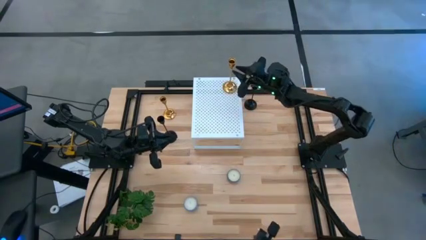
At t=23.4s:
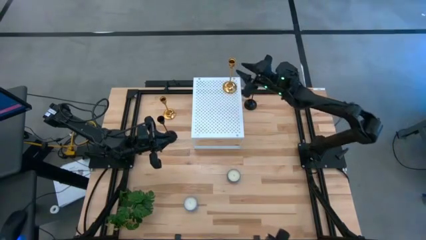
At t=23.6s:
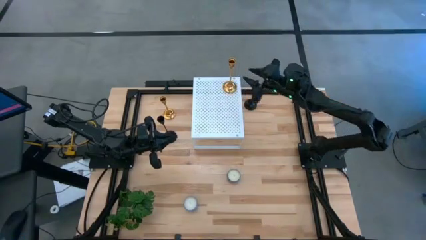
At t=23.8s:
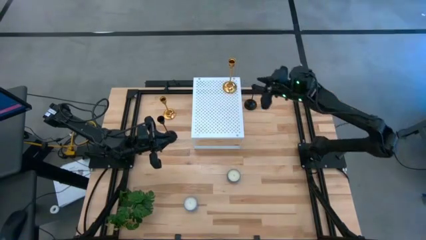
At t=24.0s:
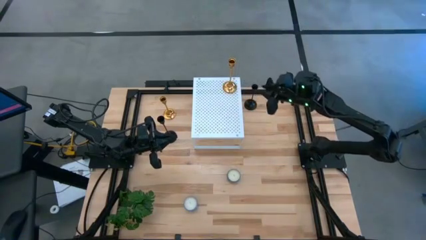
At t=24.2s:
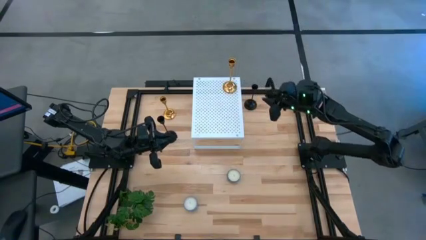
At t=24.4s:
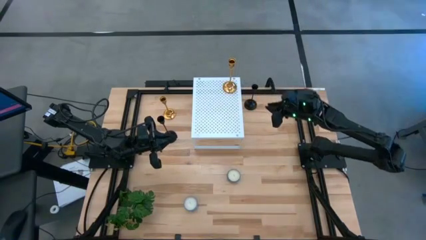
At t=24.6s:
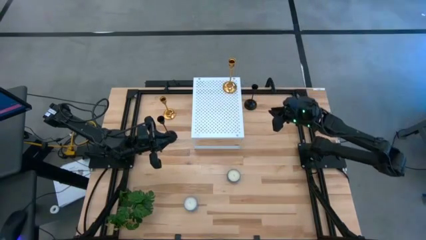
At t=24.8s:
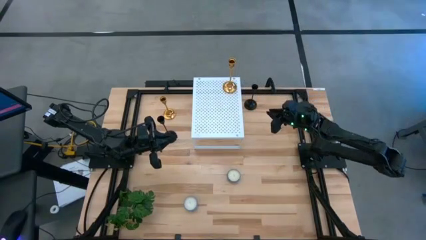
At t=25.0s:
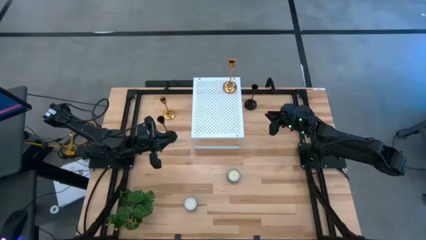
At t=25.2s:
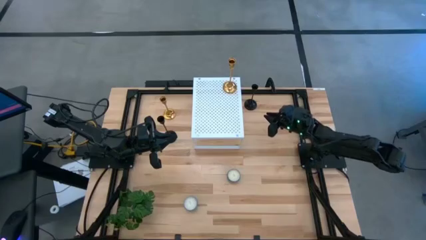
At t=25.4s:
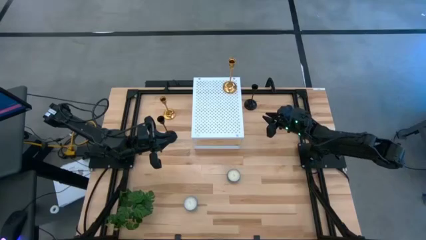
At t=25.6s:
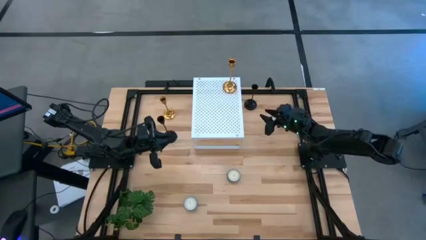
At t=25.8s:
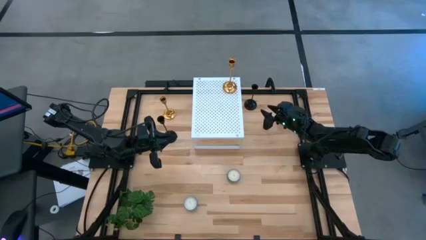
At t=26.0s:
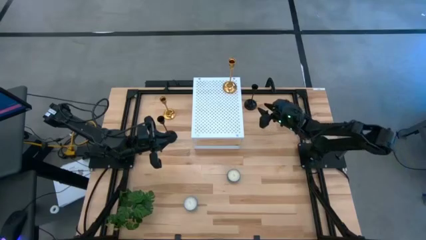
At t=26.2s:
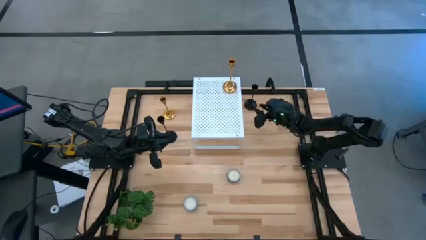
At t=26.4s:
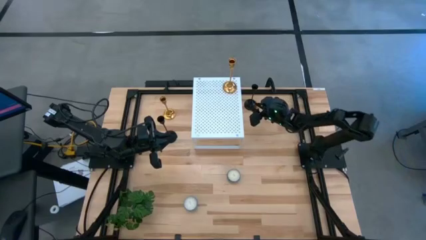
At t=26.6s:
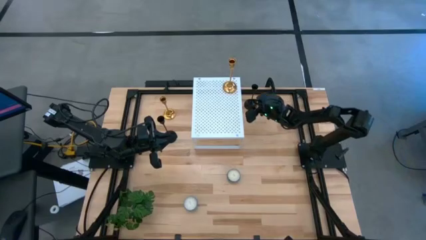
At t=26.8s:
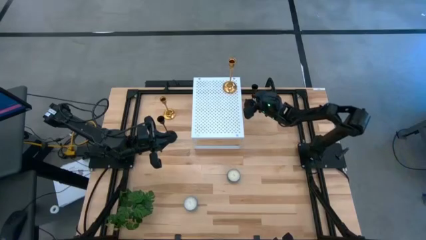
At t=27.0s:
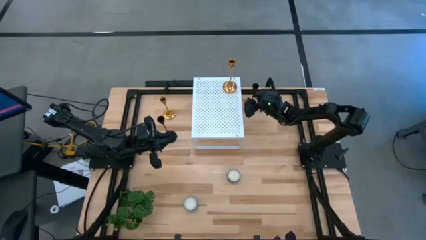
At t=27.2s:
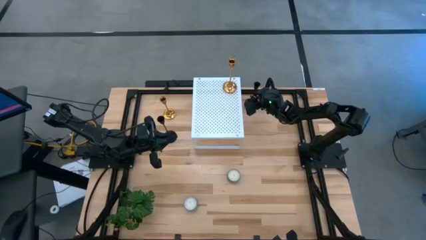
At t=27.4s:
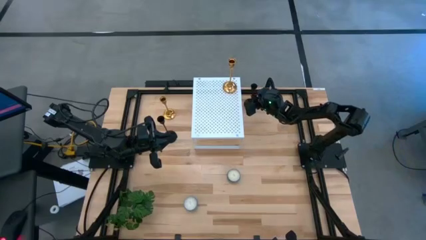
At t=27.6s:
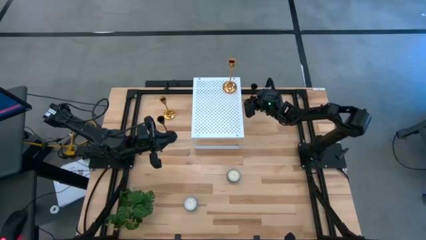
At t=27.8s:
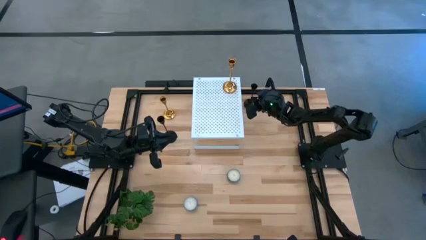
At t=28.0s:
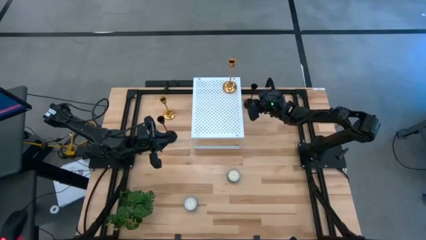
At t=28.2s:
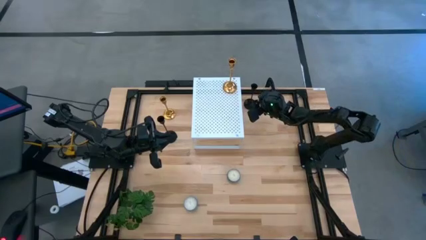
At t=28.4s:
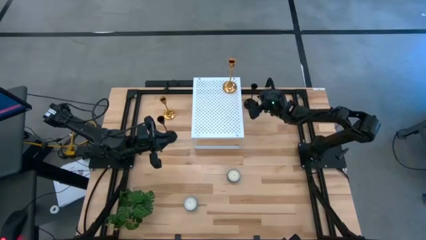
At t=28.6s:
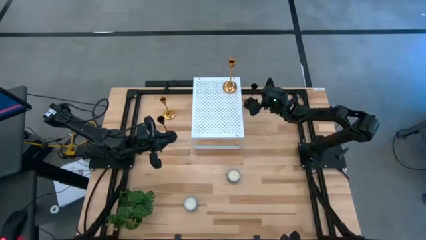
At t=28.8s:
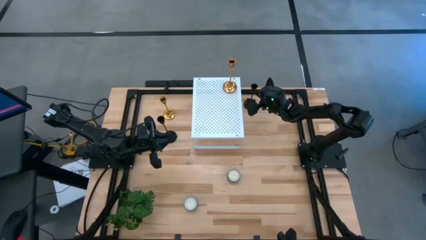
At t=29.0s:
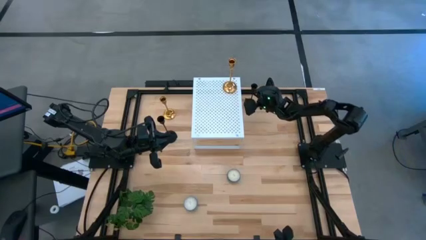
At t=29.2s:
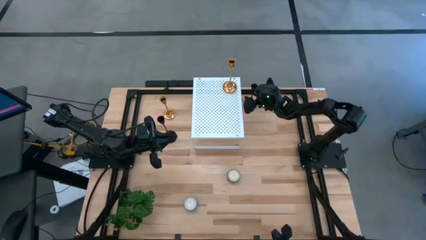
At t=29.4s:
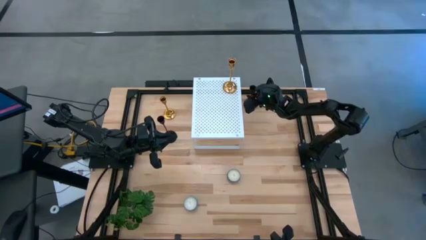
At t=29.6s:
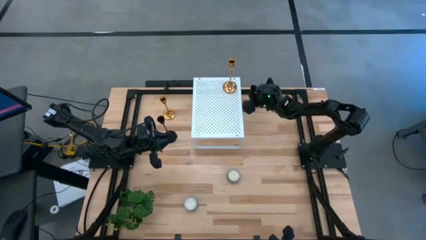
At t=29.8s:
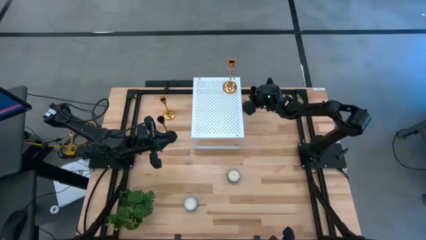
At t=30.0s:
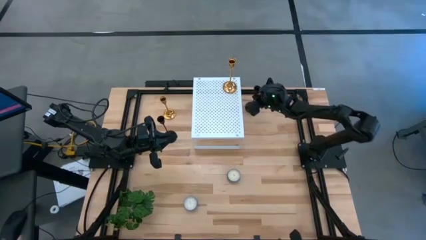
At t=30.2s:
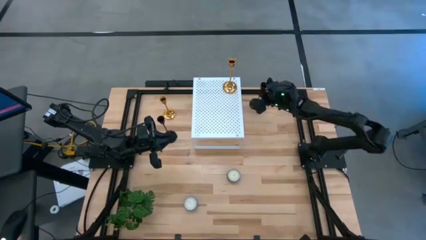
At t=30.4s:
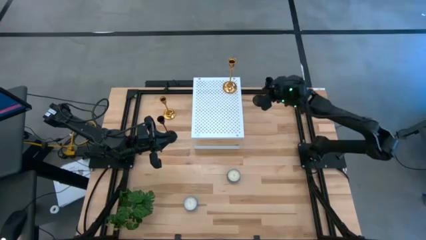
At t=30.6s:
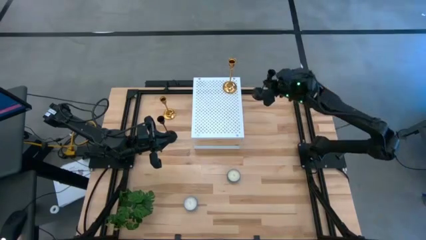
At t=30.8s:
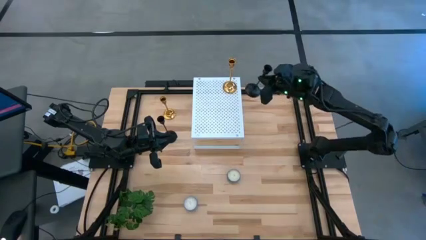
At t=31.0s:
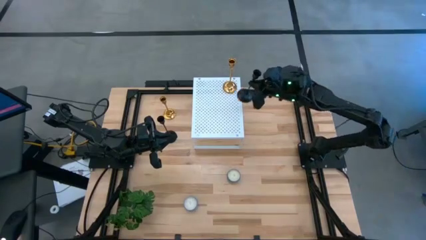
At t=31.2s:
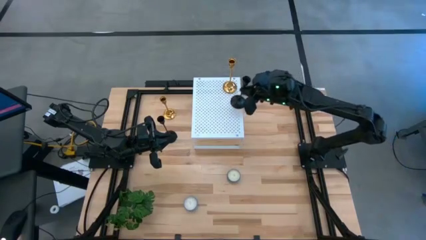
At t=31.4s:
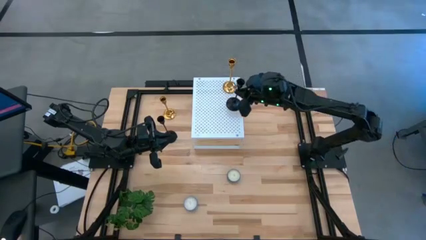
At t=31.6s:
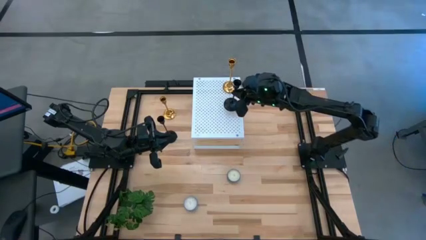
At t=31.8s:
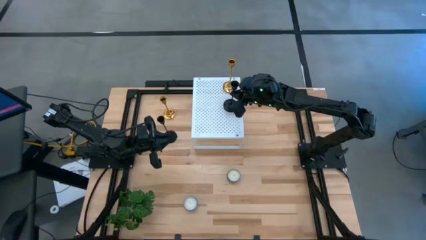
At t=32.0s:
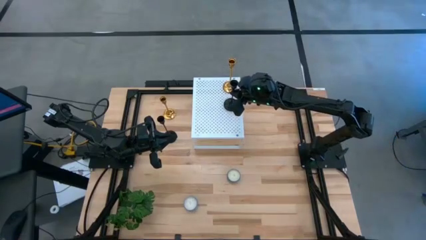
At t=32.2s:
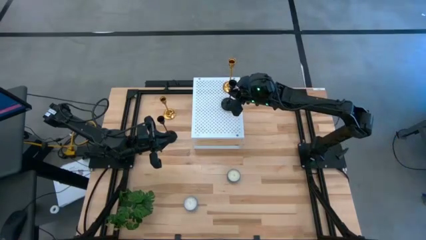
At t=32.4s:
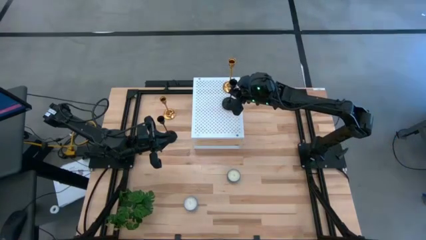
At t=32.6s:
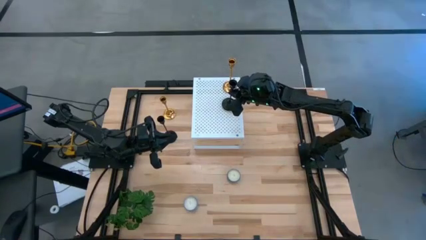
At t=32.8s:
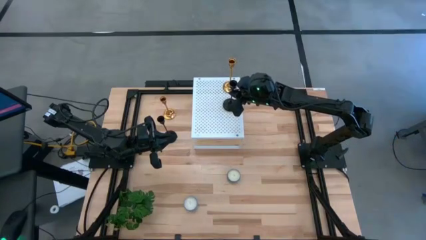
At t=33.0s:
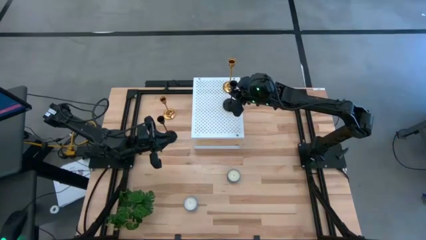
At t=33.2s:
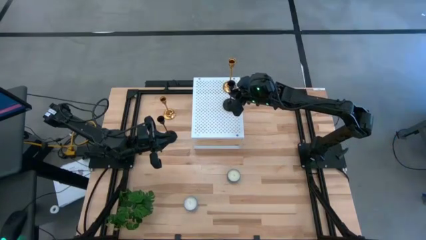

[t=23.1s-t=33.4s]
Task: Pick & Place candle stick holders
Put the small black candle holder on the shelf

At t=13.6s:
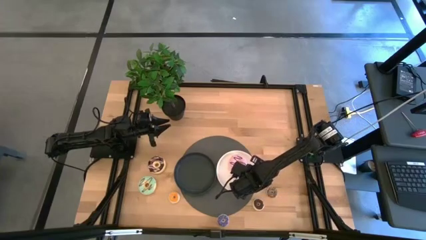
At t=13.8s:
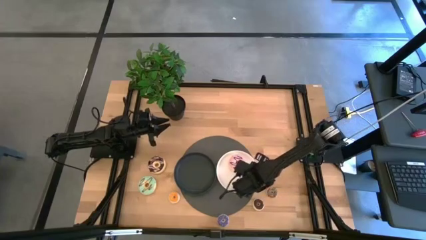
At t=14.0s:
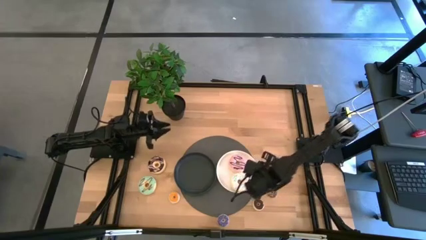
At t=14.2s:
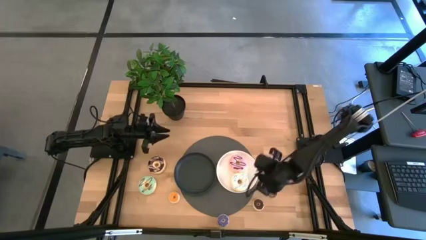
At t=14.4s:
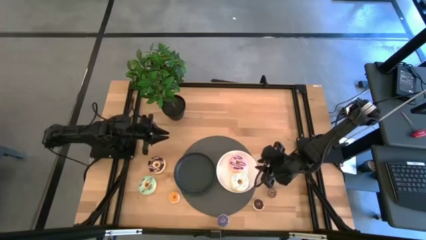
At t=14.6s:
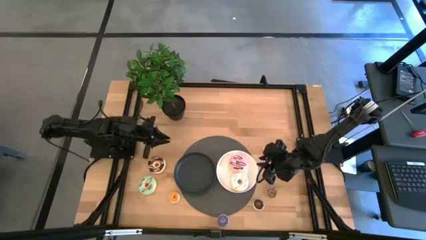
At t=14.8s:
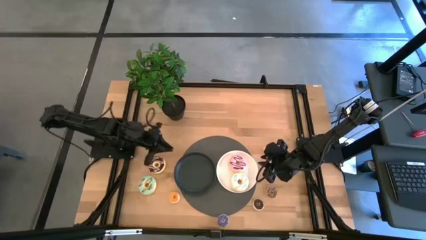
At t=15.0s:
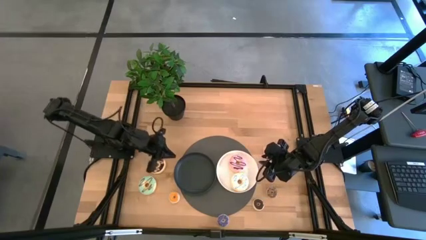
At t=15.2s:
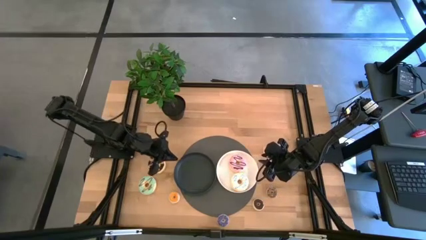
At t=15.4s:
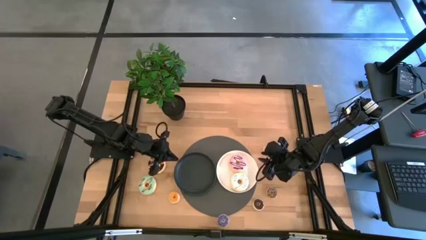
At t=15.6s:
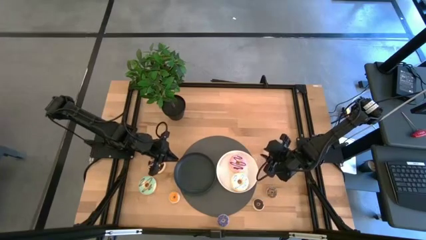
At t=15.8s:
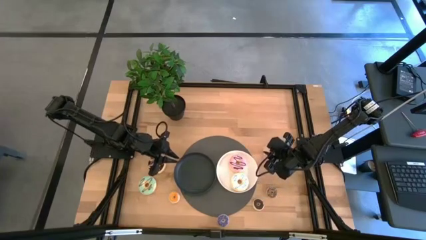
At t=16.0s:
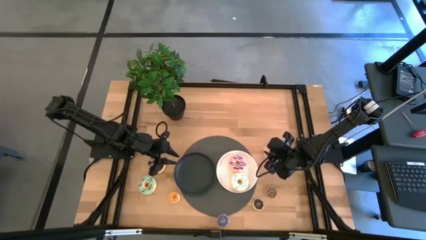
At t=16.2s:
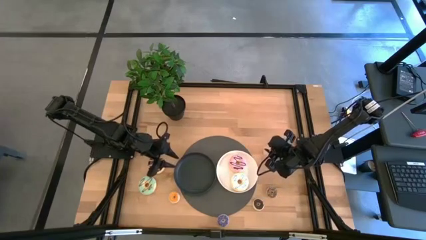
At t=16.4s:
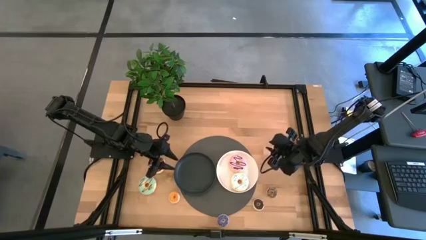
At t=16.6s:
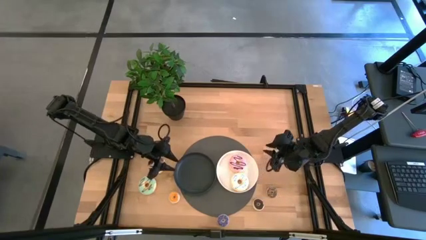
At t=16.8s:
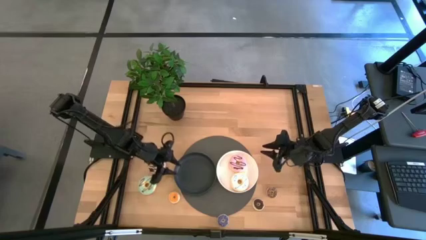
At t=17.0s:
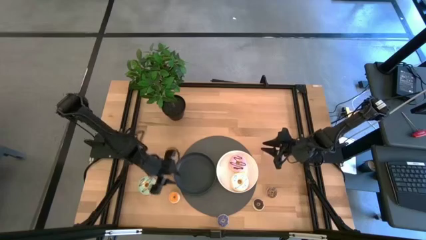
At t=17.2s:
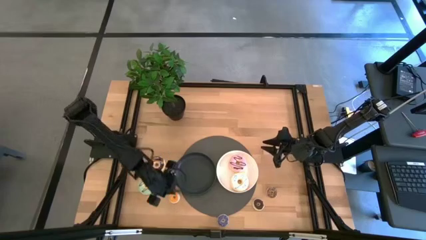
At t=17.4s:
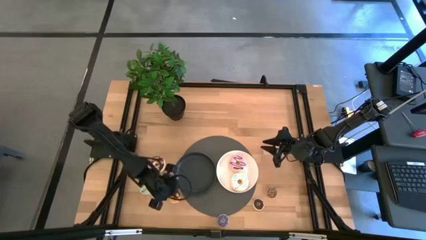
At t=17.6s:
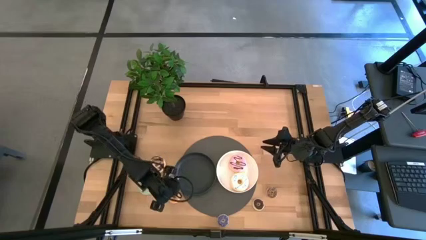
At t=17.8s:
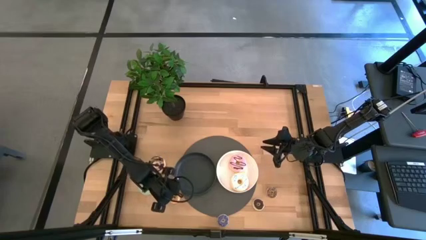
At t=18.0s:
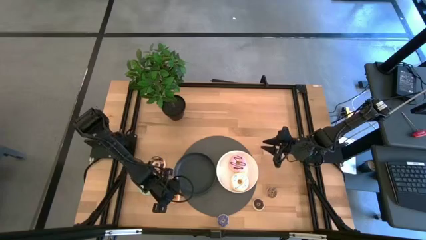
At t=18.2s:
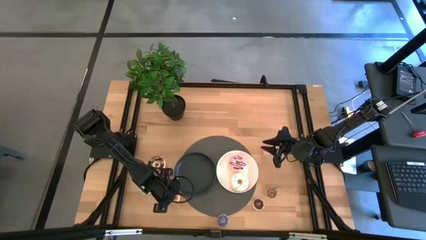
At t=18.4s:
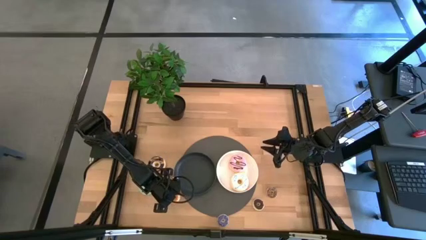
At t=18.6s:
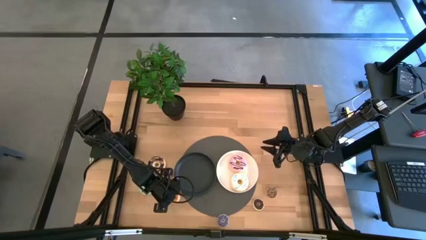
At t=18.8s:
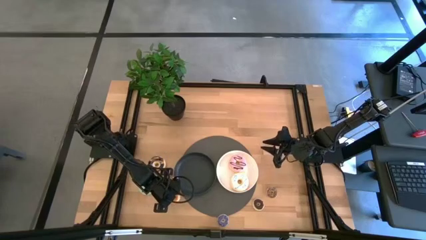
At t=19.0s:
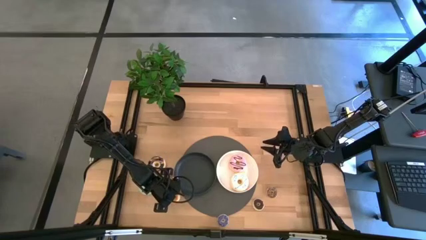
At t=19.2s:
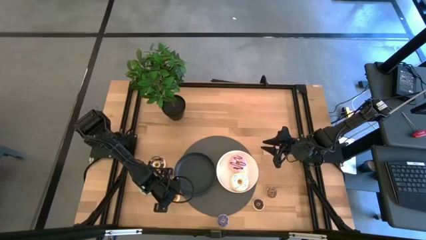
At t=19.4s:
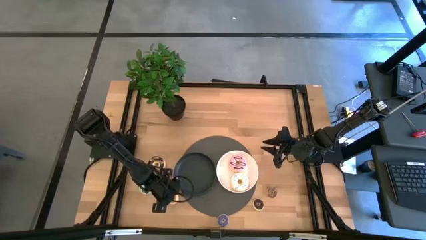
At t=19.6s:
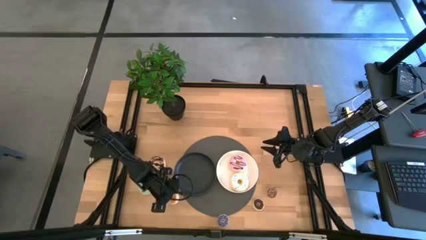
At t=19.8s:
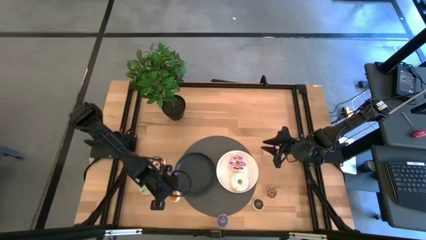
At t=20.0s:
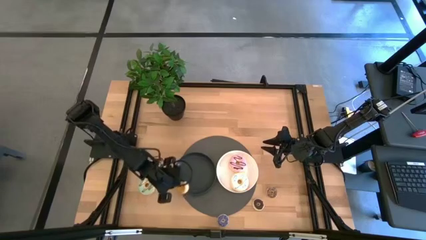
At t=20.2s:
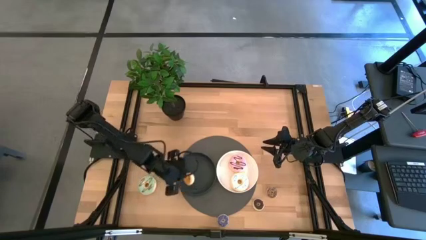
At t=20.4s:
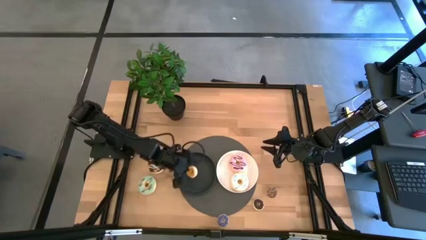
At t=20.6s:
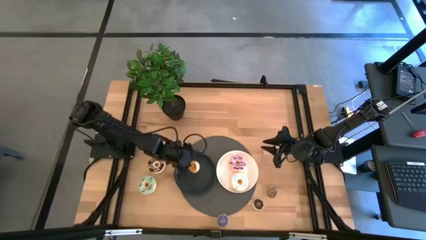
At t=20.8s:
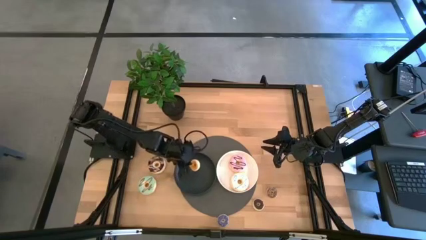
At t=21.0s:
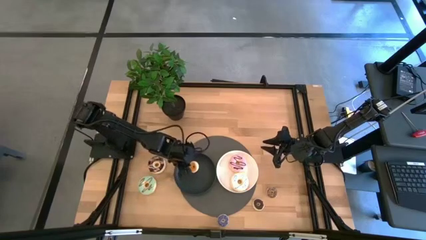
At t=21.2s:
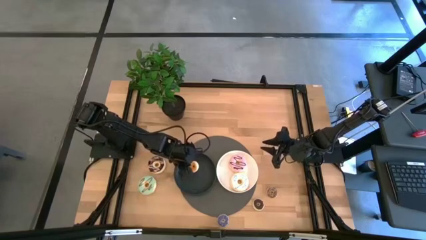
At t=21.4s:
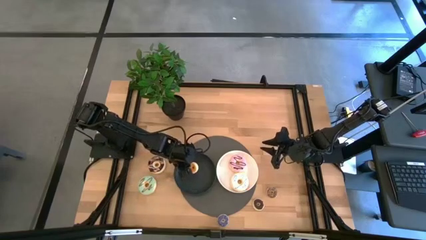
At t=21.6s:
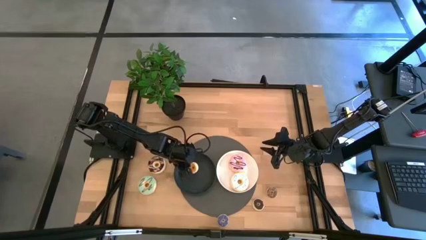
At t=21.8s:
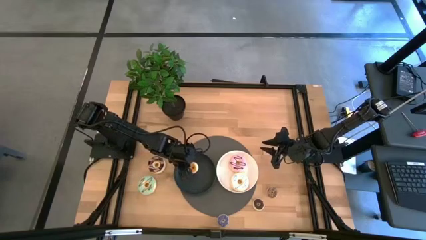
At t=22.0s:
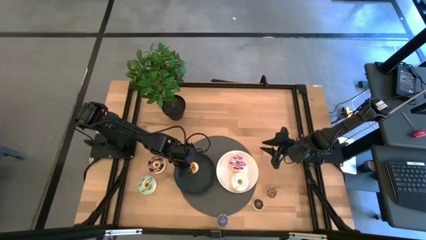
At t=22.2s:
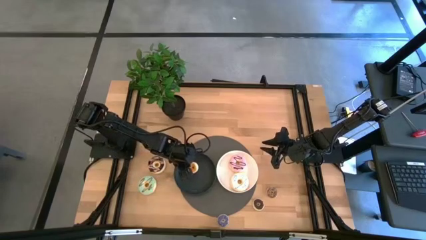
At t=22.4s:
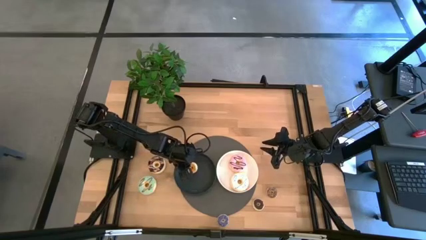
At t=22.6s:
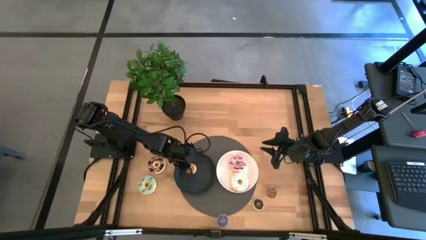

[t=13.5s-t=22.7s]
Task: Pick & Place donuts
Put the small orange donut onto the black plate
